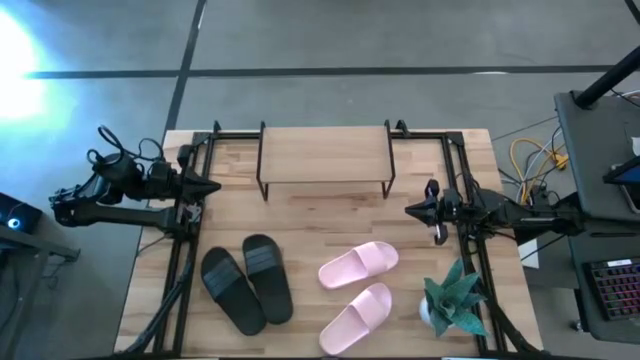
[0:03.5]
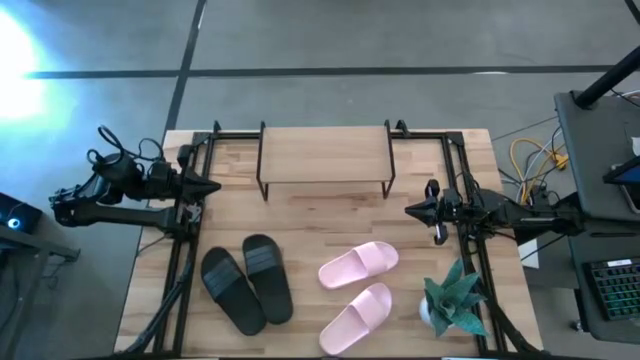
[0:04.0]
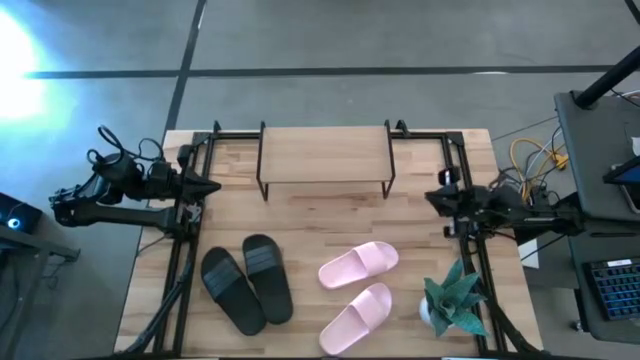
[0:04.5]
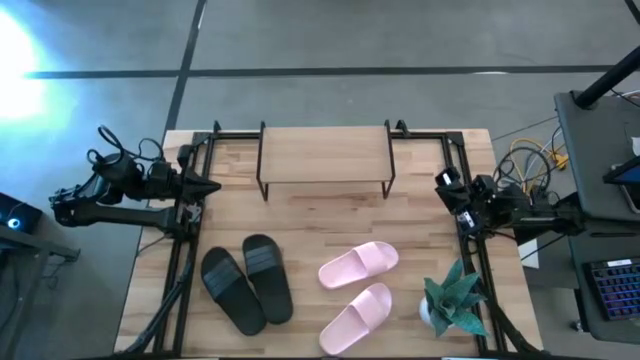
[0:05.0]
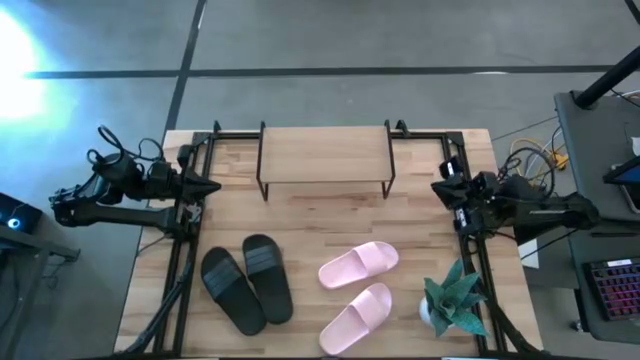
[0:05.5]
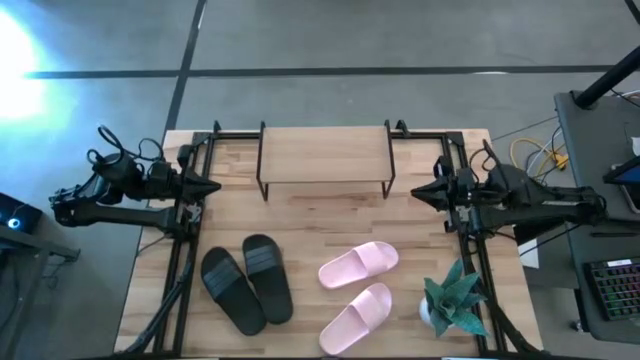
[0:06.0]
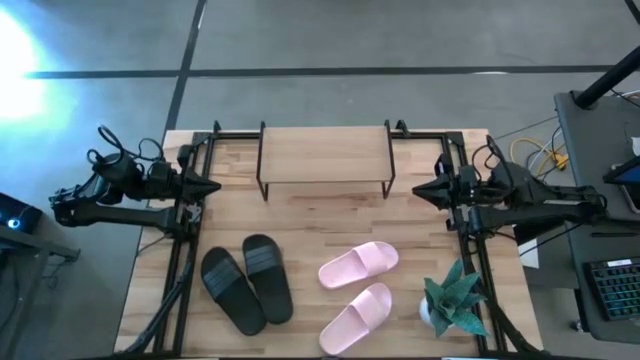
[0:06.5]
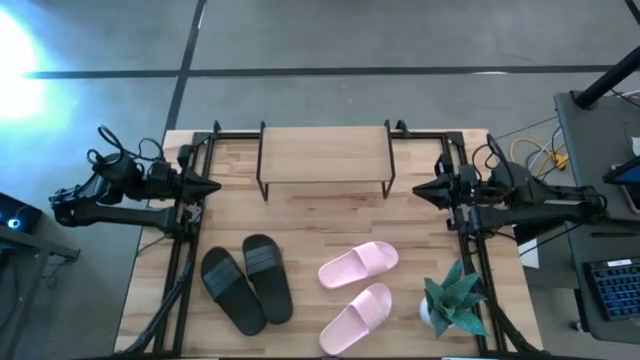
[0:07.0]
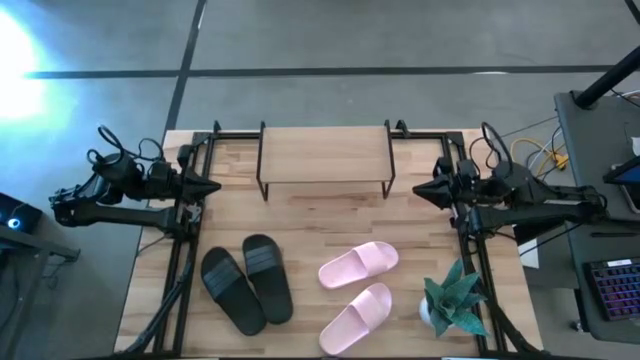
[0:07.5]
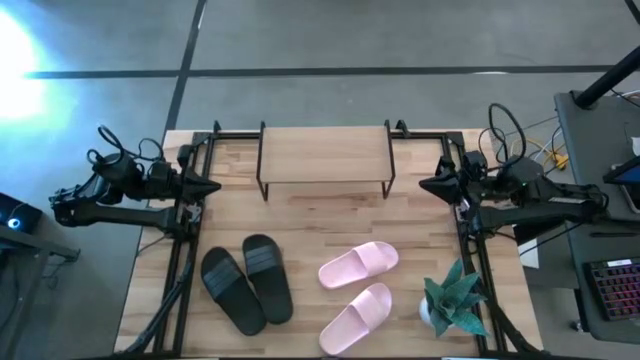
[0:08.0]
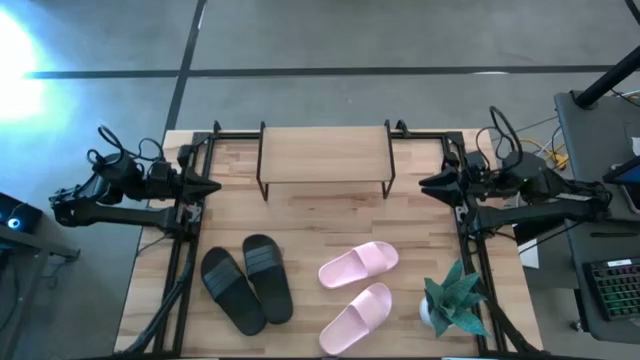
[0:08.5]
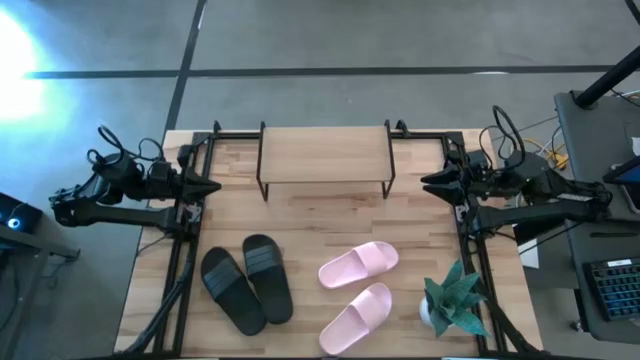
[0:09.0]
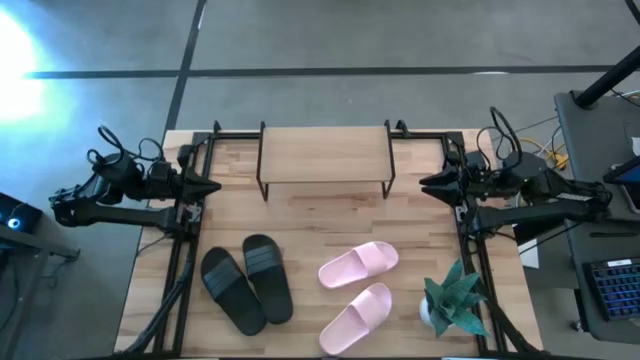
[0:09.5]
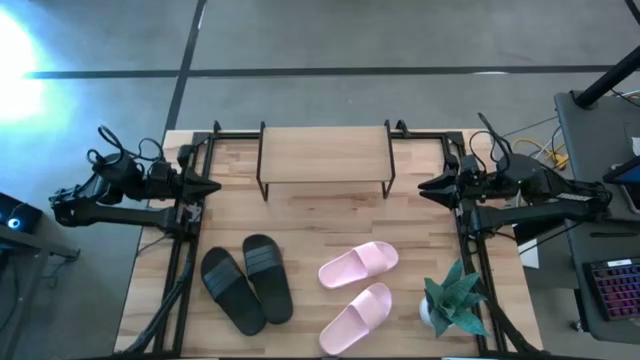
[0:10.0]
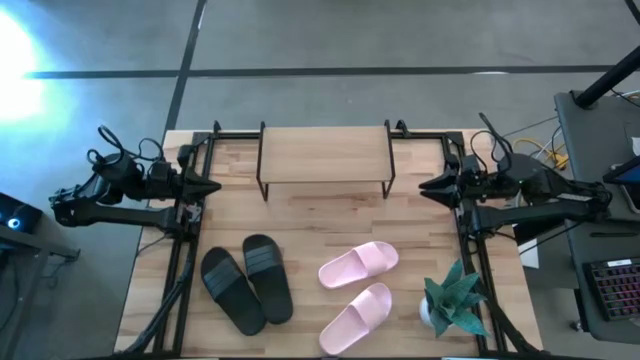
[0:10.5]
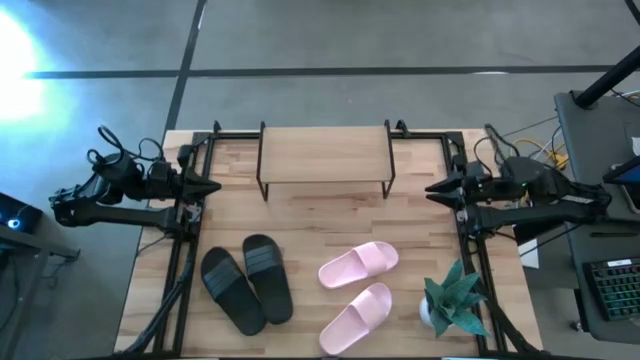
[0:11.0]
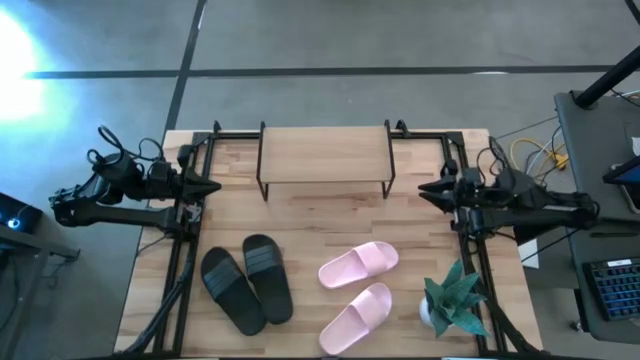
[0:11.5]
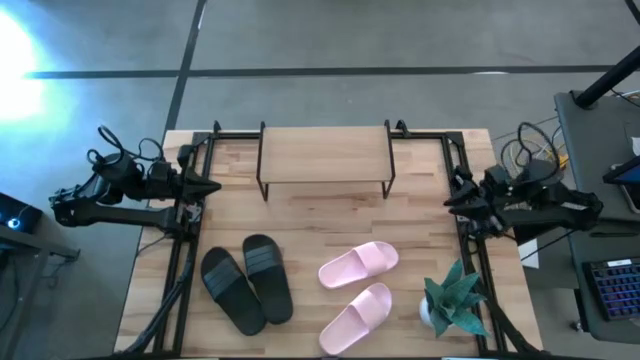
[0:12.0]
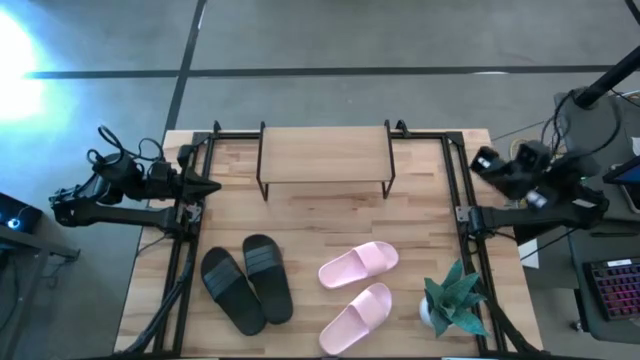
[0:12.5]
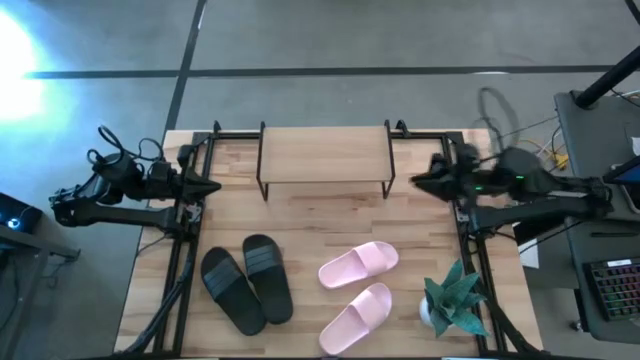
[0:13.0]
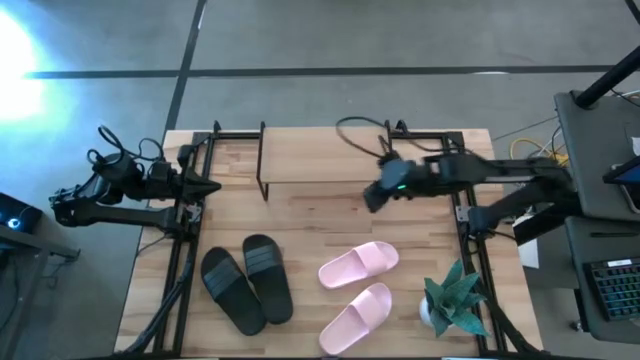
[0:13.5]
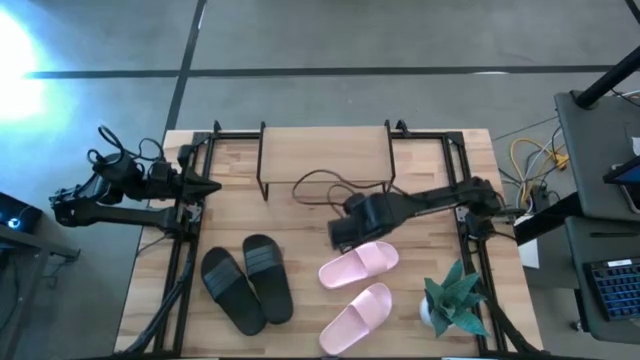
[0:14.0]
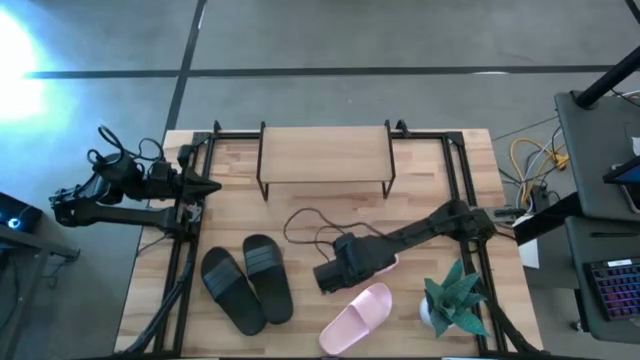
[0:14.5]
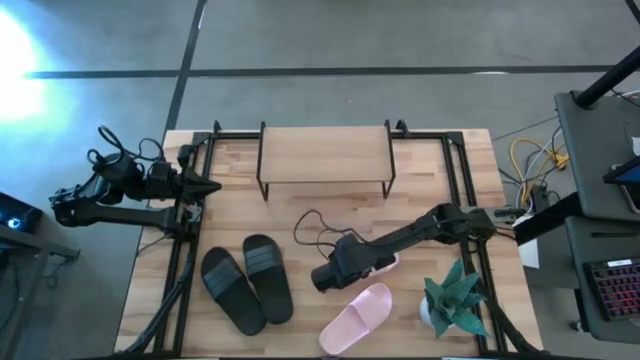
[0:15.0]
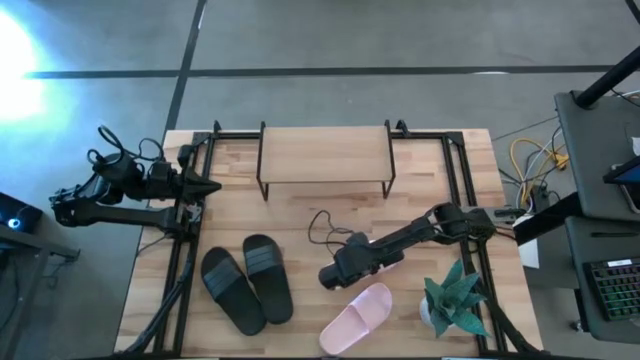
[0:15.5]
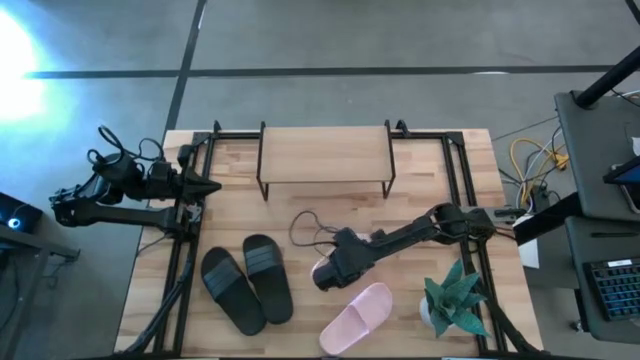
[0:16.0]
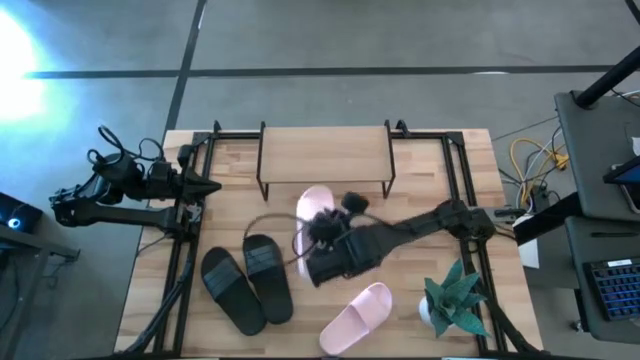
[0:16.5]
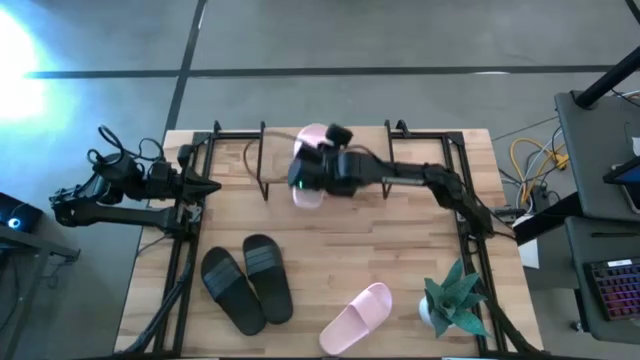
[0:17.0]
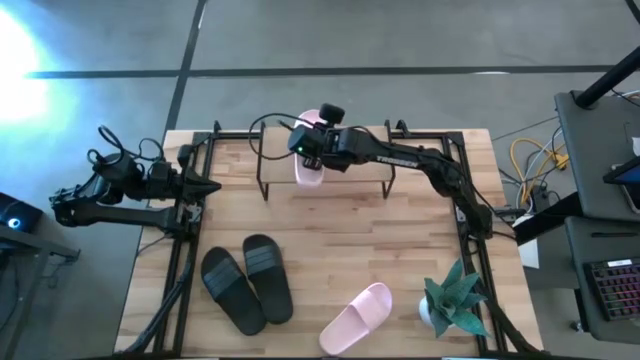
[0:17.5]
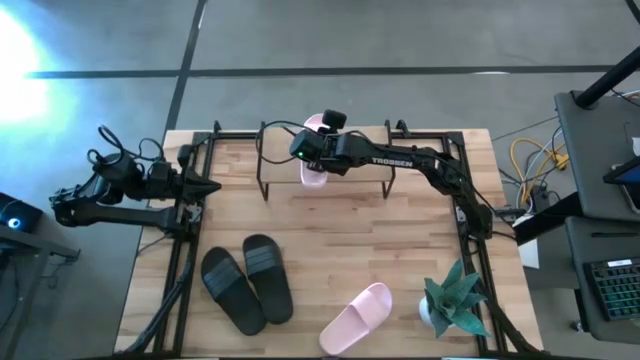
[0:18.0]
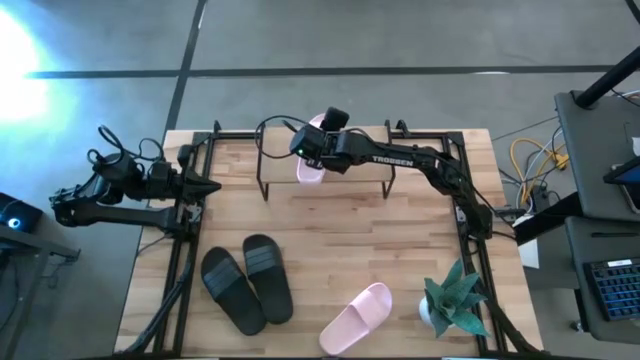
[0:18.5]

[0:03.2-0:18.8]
Task: Pick and place slides into the shelf
Put the top pink slide on the shelf

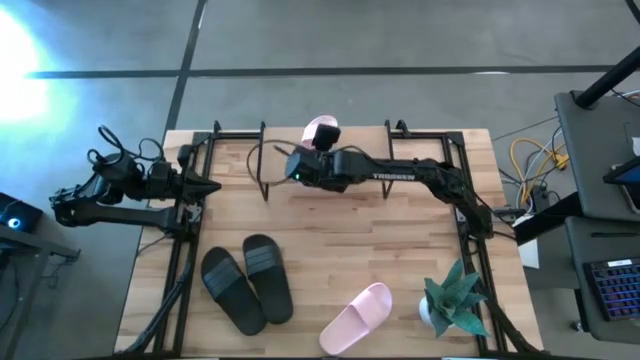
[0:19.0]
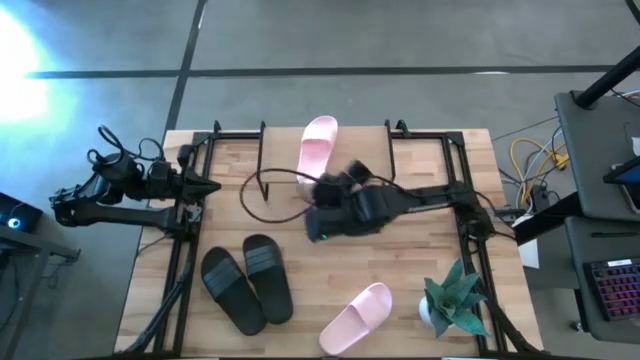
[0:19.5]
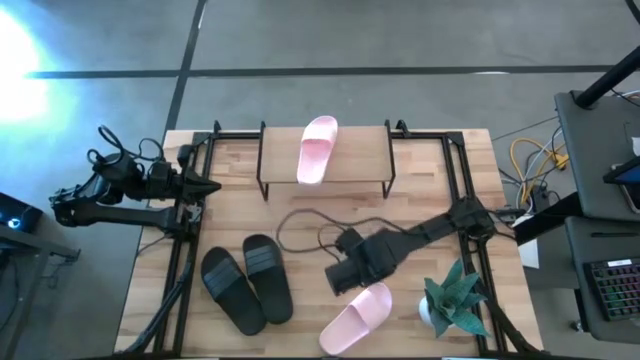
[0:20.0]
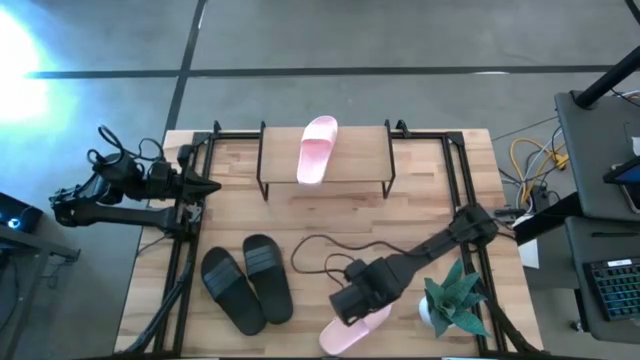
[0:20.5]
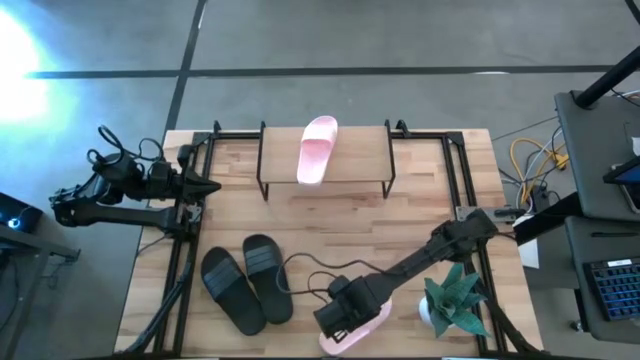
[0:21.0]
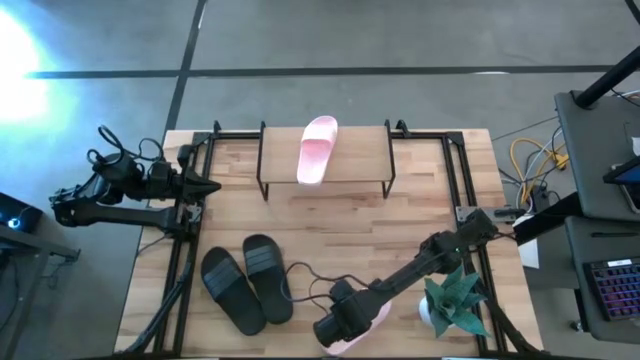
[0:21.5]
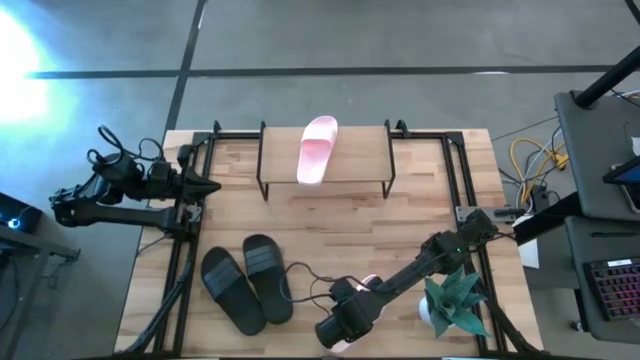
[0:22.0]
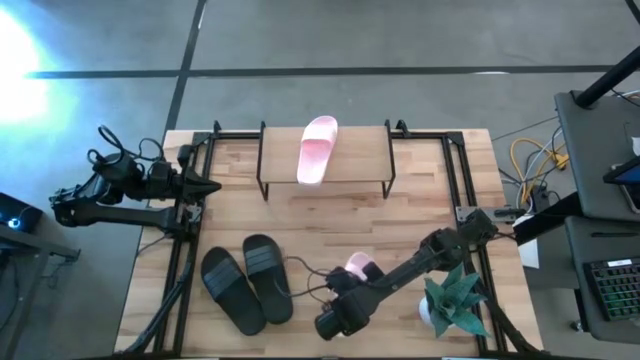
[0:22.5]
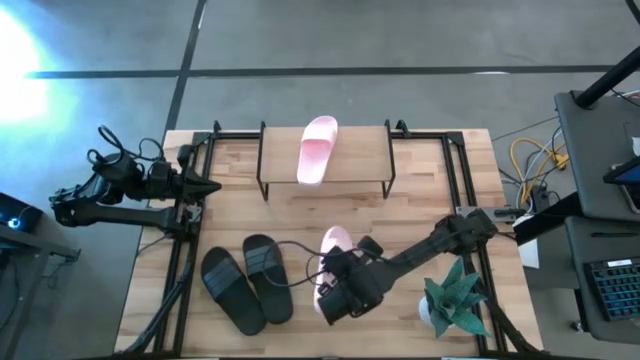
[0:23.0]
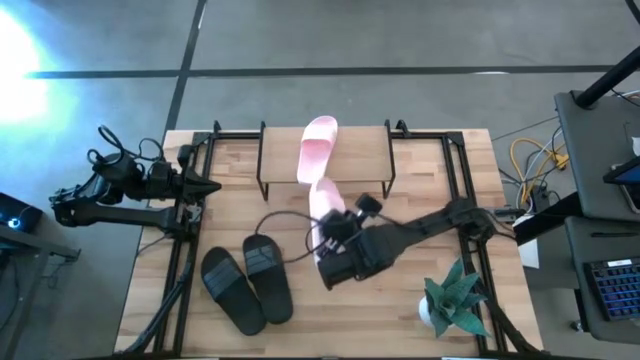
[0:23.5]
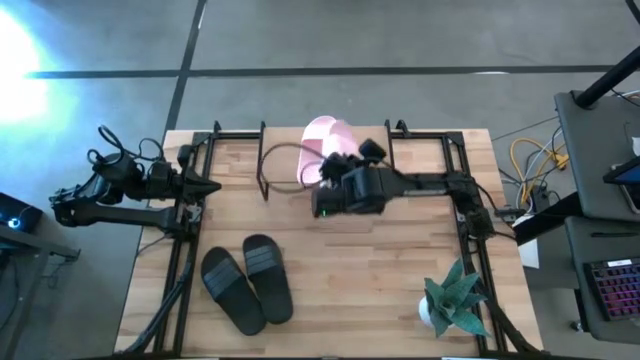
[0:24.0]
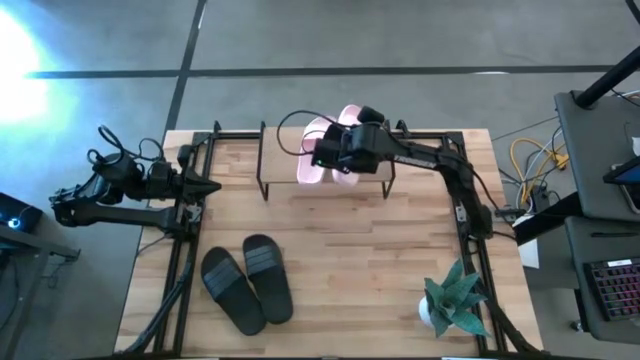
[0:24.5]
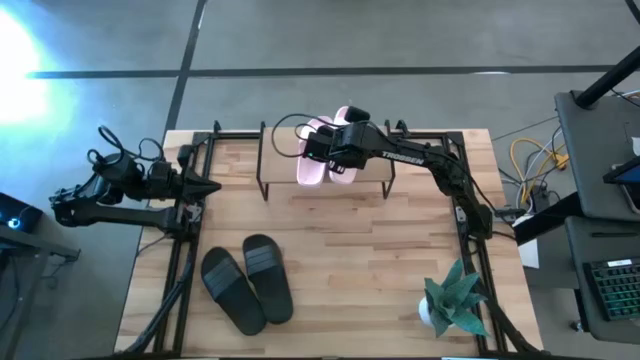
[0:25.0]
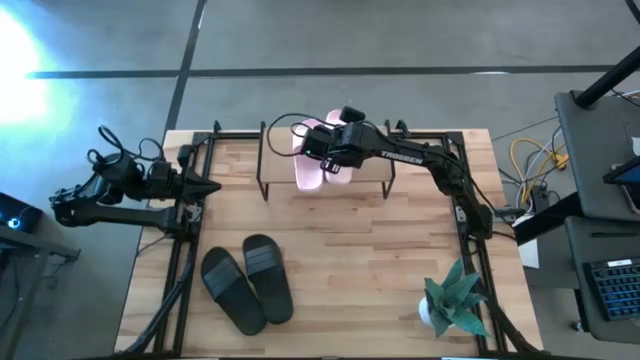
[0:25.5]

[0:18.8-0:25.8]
Put the pink slide on the shelf

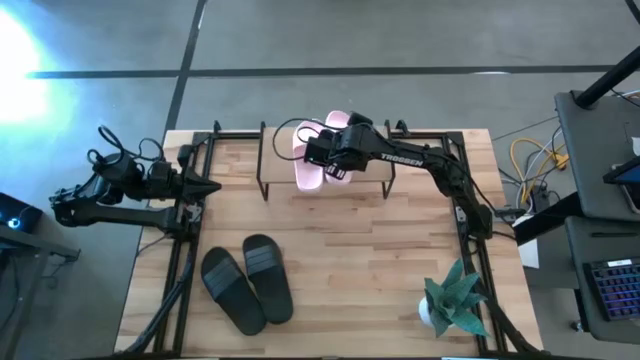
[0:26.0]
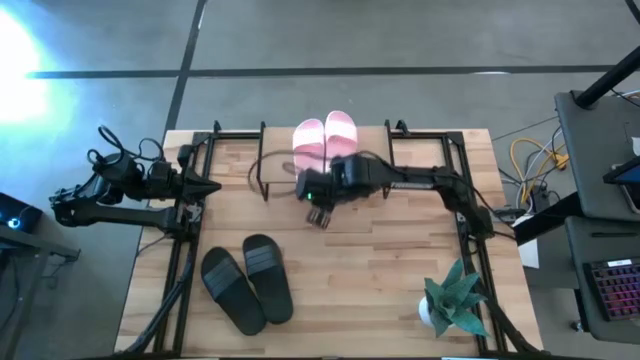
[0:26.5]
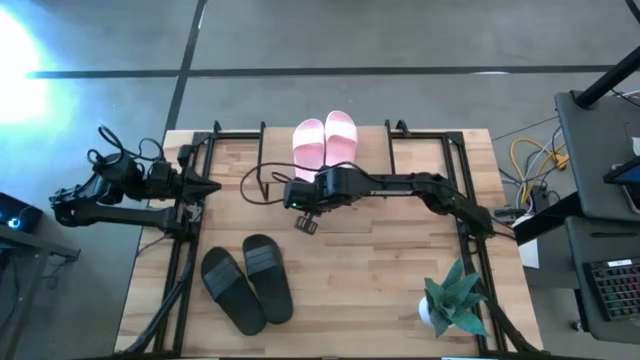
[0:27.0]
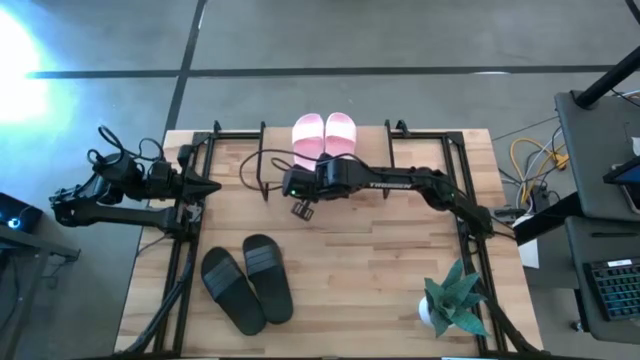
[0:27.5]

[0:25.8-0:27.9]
Adjust the pink slide on the shelf
